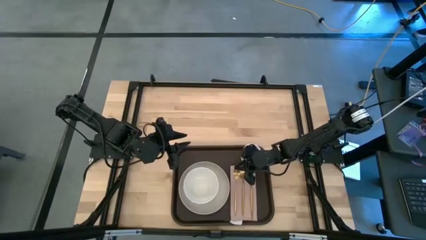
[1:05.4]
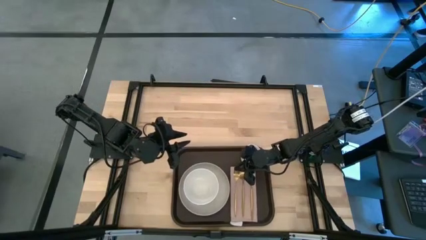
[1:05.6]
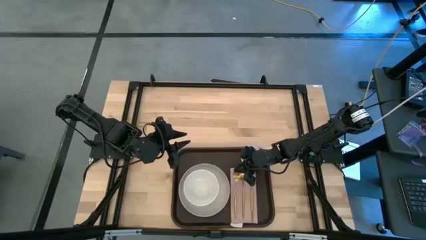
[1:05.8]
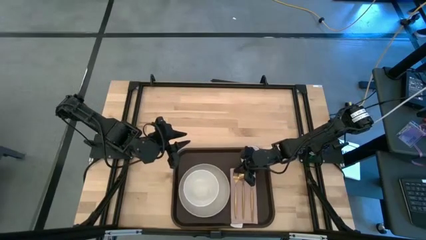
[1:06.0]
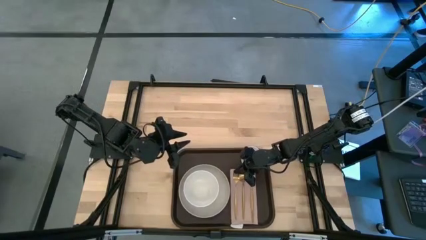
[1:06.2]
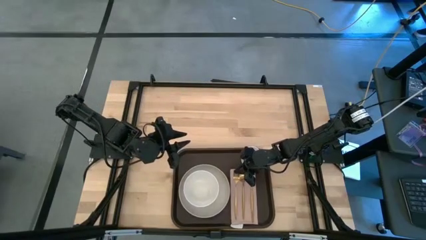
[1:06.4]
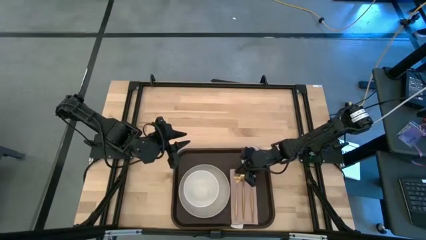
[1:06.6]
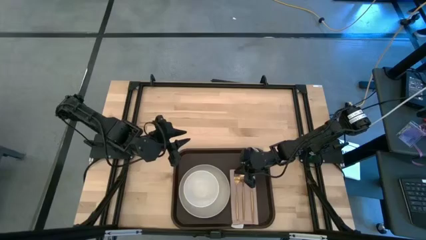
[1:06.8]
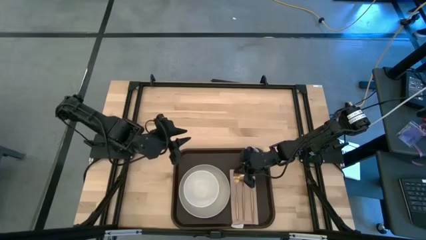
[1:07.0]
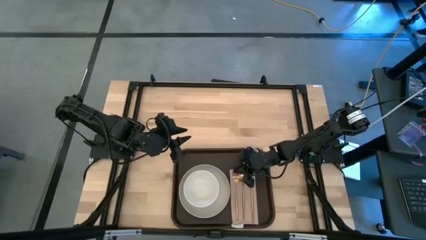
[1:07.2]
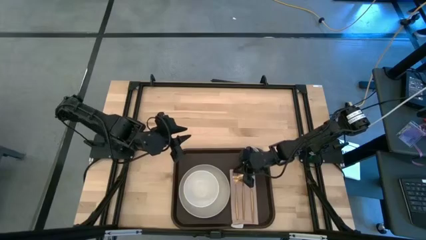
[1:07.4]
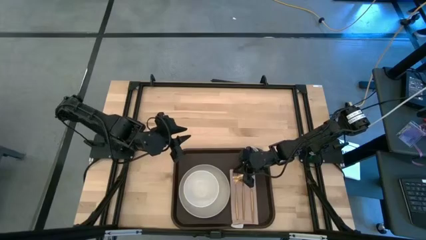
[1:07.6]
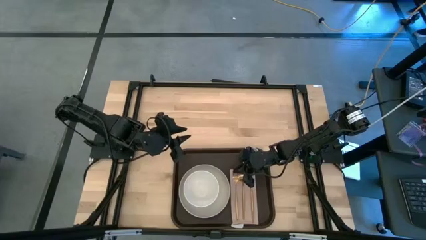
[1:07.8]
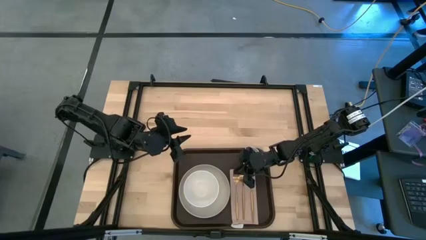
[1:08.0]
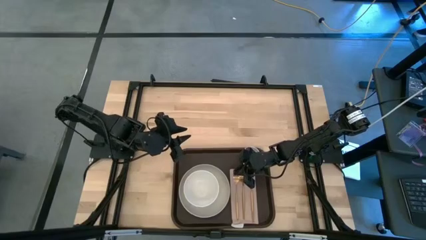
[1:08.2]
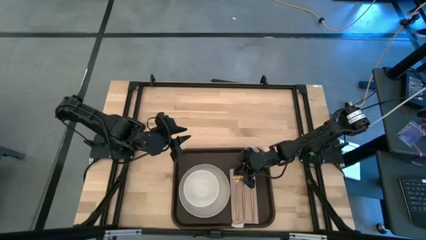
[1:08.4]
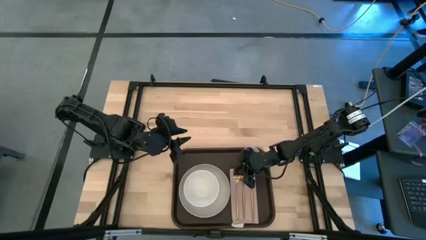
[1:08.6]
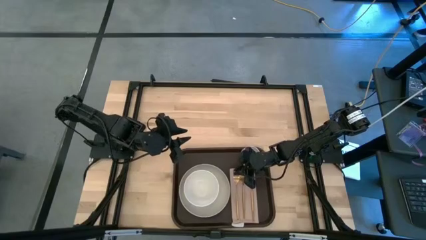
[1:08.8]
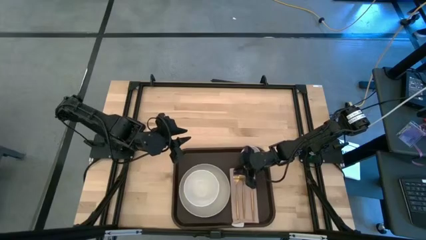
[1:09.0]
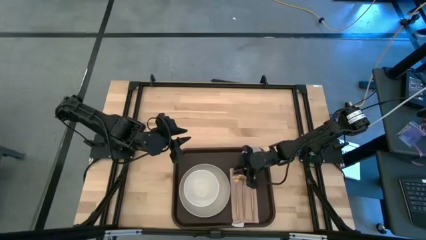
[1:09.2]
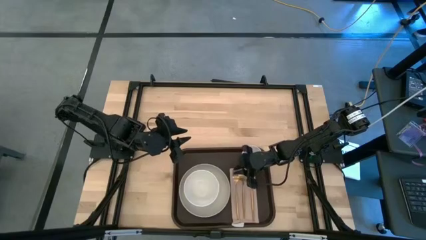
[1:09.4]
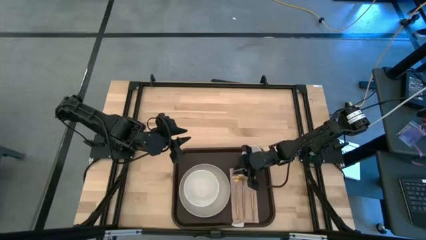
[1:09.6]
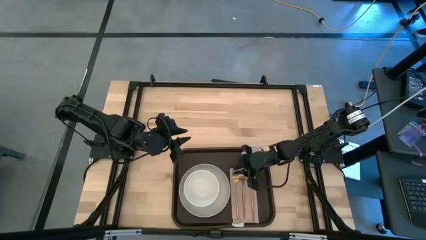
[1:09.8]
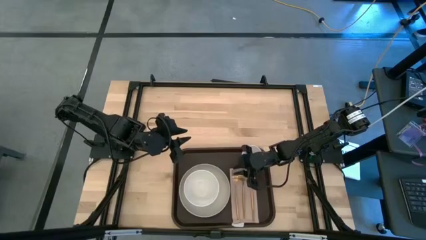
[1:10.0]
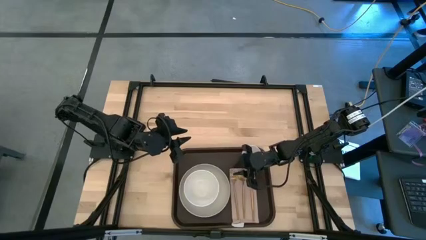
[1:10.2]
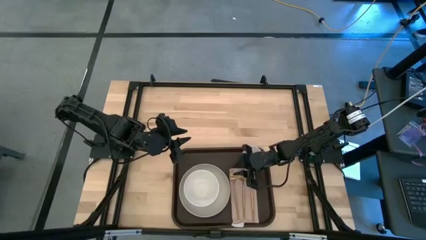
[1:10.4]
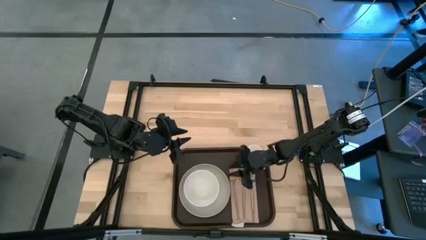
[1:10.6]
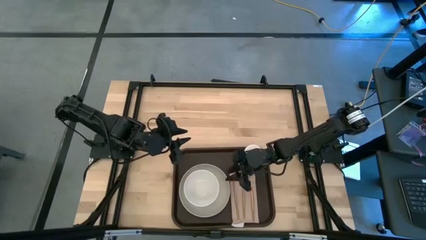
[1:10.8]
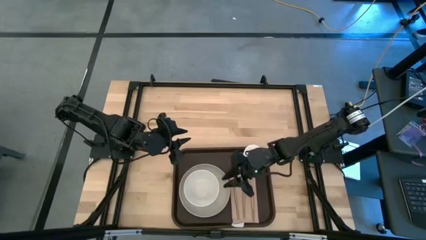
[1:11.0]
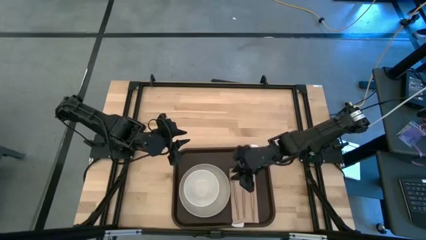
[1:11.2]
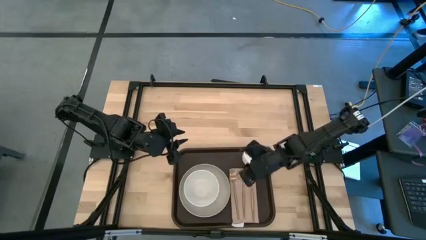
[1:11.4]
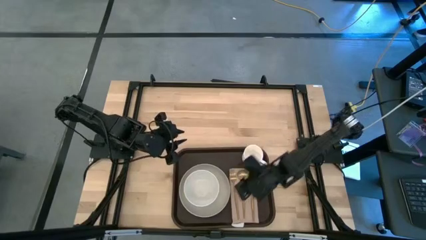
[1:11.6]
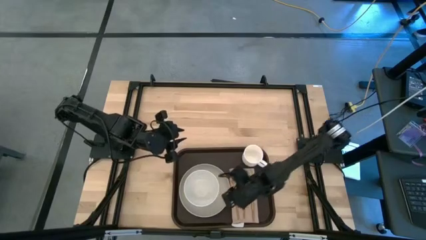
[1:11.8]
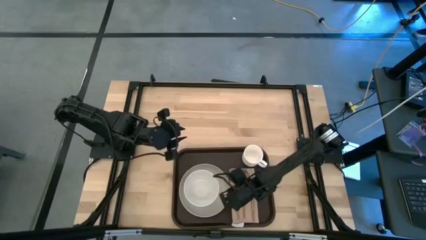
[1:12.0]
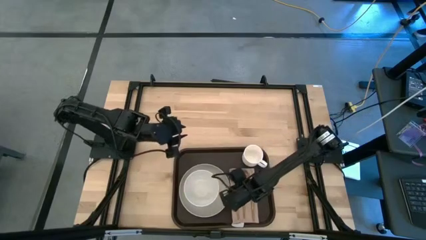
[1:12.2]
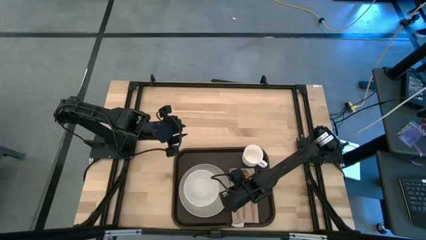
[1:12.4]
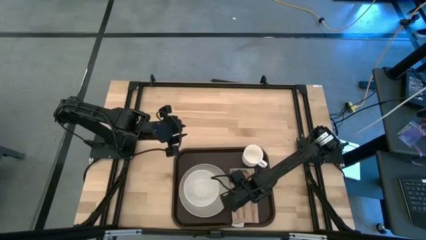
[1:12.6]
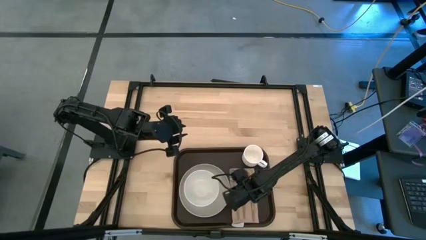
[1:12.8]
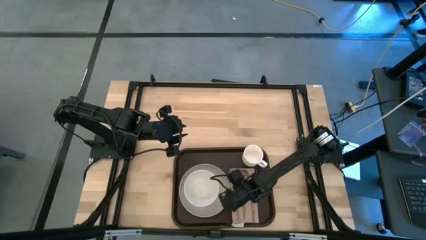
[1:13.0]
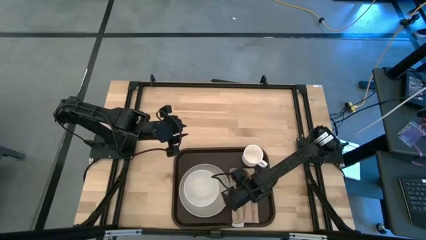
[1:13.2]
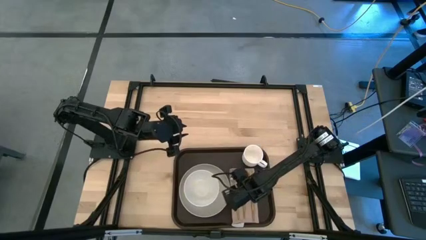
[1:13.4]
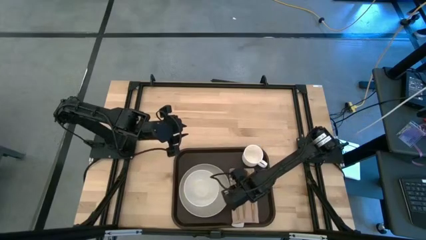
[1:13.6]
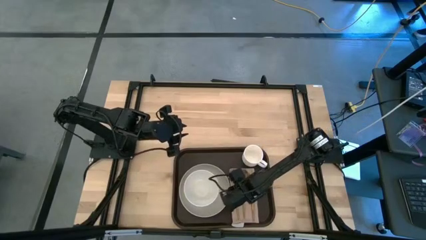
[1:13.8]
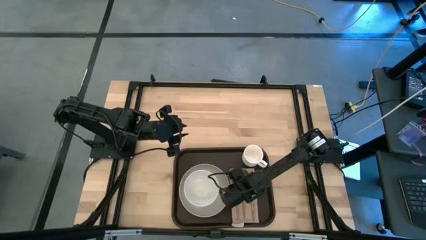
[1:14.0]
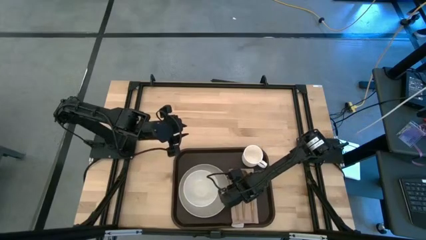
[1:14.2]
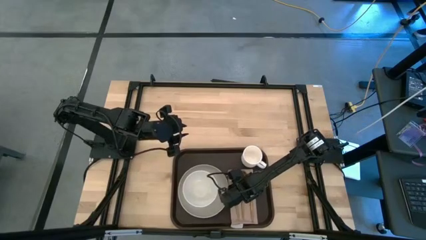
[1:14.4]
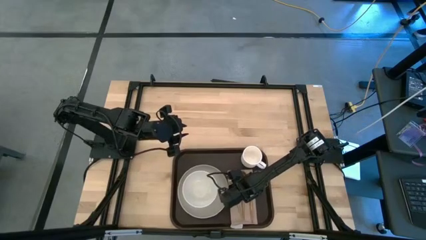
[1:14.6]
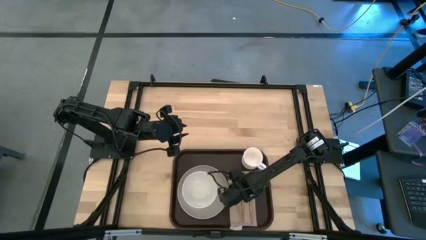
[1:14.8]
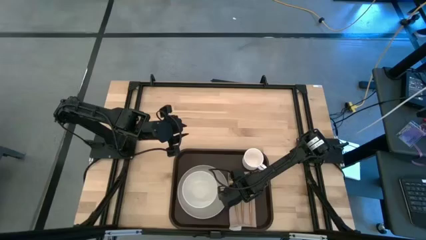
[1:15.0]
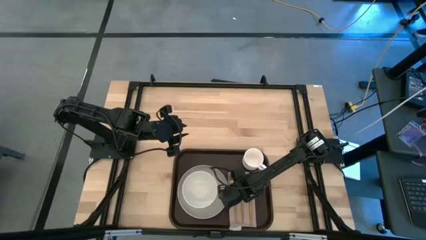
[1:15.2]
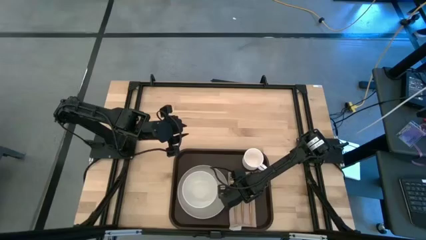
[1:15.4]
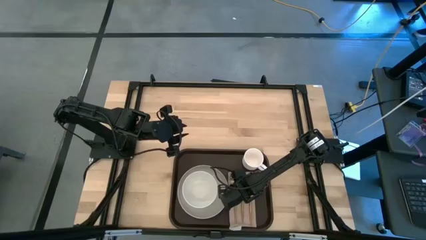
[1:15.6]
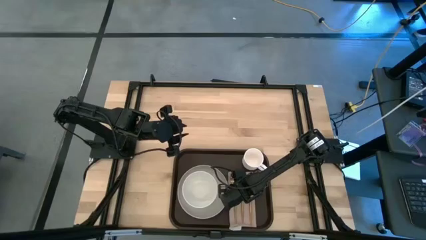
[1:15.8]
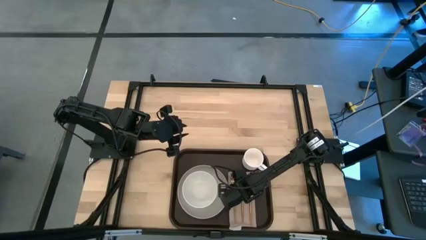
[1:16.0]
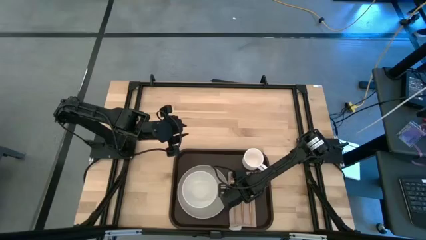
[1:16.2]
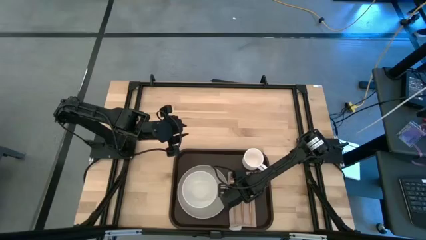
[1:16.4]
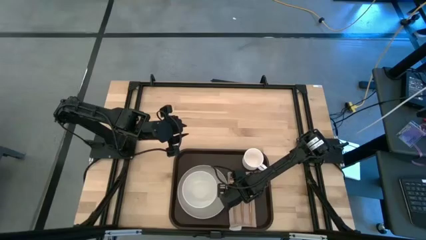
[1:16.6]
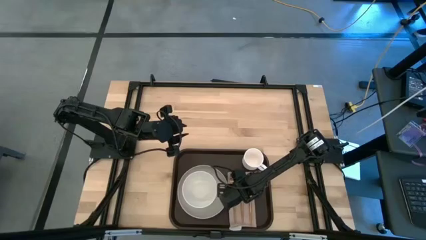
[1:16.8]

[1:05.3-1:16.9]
Task: Set up tray
Put the gold fork on the brown napkin to the left of the gold spoon

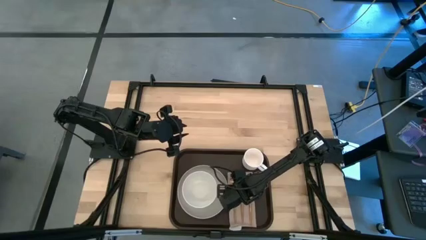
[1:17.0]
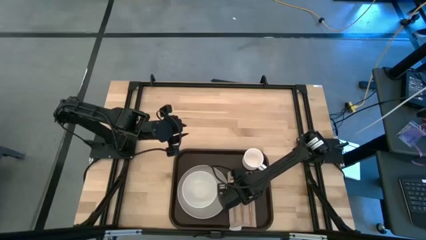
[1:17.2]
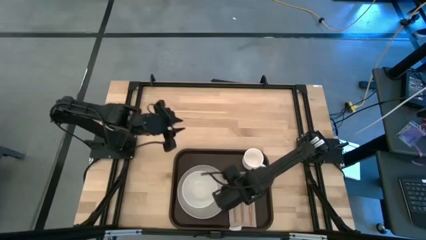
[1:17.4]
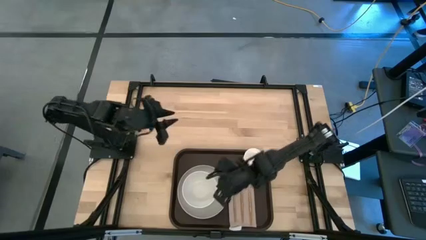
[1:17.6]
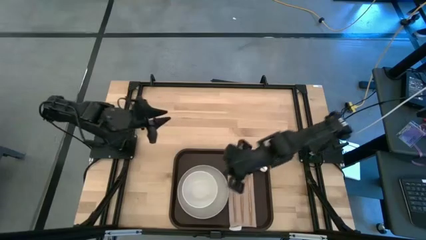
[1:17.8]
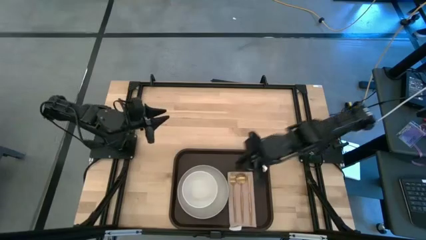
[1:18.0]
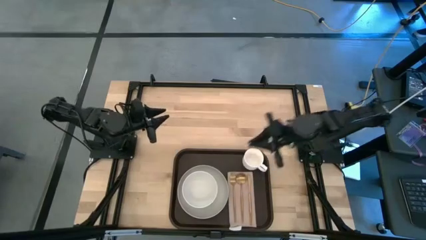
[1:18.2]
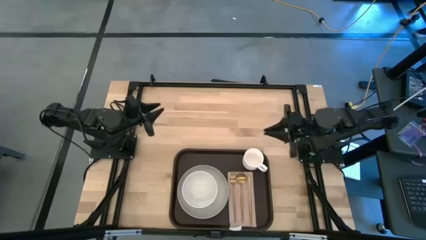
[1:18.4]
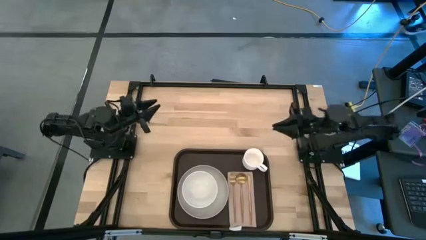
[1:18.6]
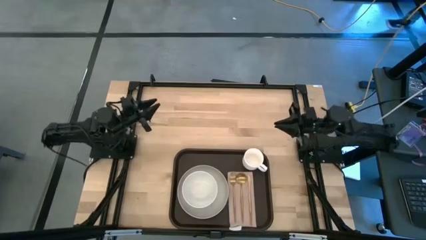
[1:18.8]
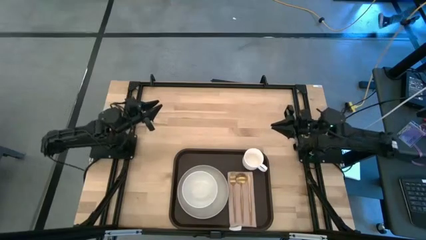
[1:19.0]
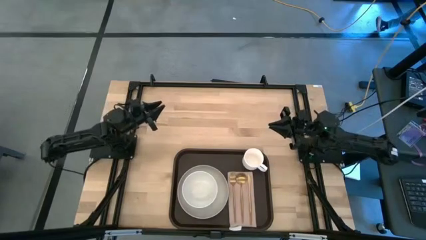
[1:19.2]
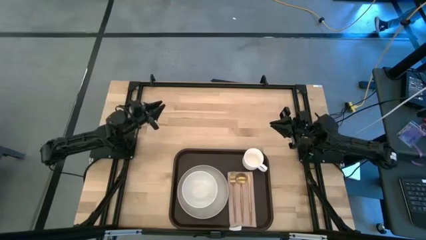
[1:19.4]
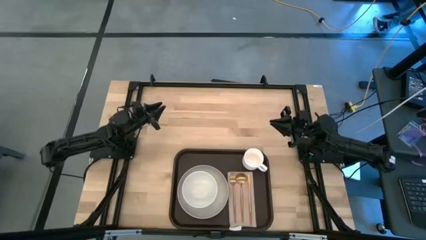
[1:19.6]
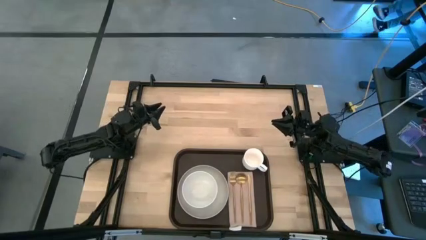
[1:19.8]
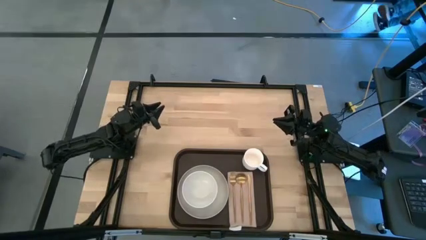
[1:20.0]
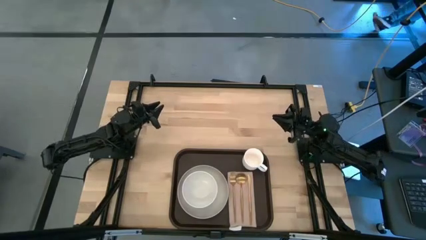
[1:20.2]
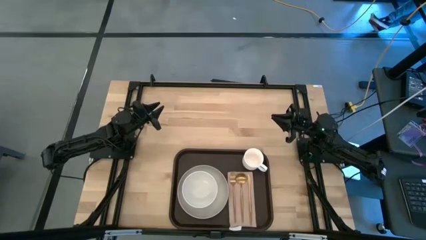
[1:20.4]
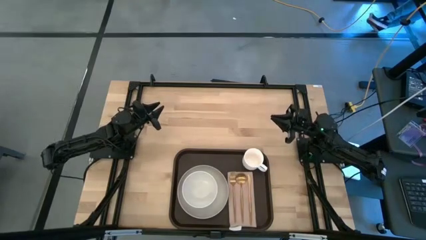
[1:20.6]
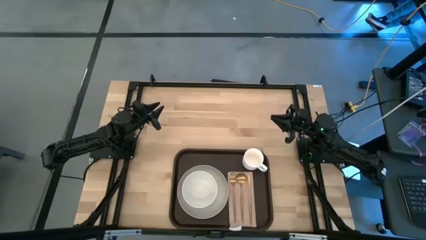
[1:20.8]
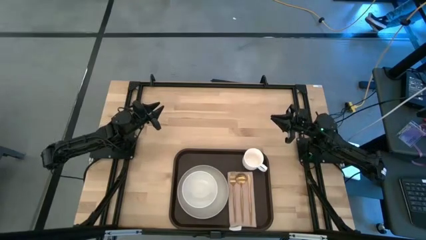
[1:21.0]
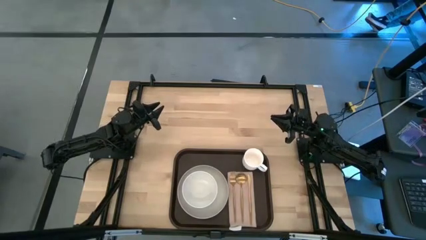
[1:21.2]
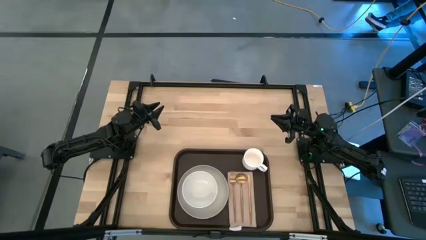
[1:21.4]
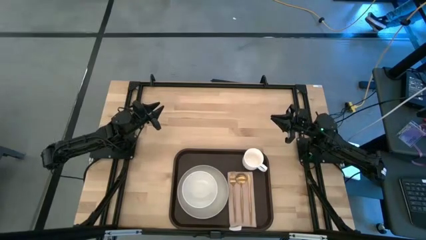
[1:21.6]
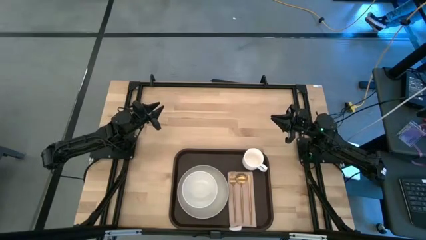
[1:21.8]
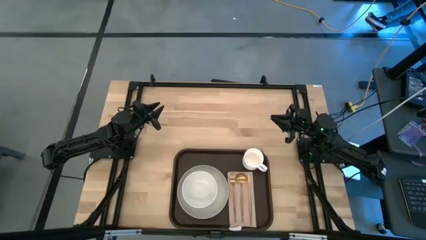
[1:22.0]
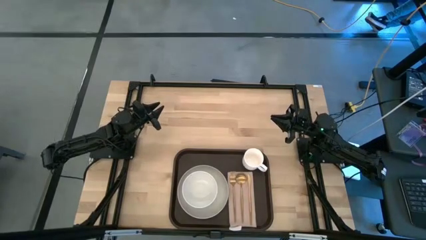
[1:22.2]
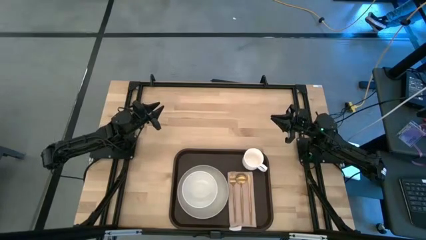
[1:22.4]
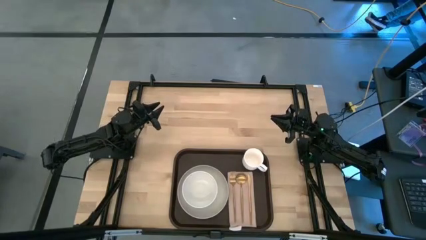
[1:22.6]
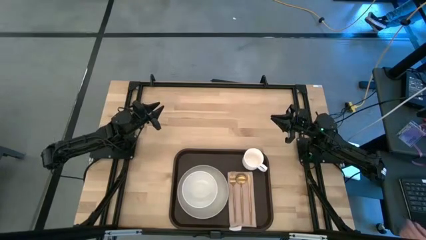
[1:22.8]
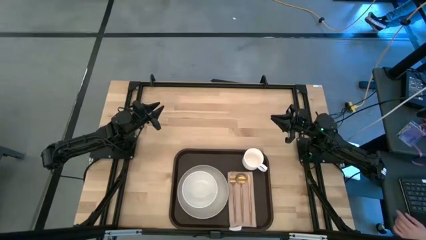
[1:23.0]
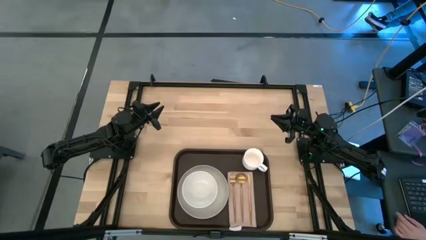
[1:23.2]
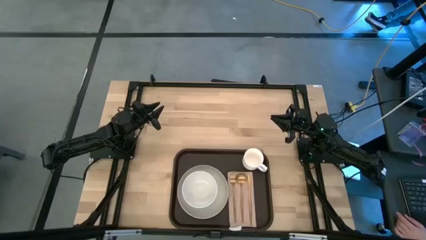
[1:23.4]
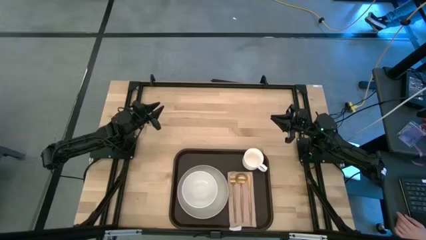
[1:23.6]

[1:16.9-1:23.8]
Return to Home Position
